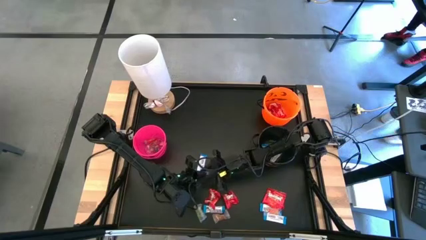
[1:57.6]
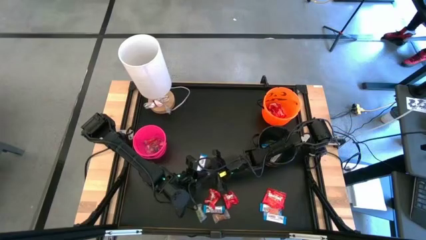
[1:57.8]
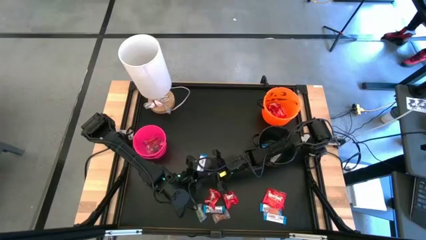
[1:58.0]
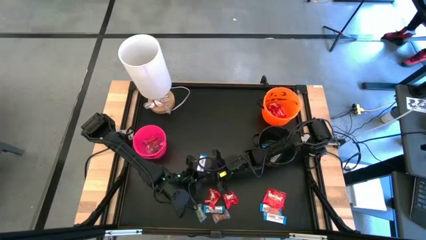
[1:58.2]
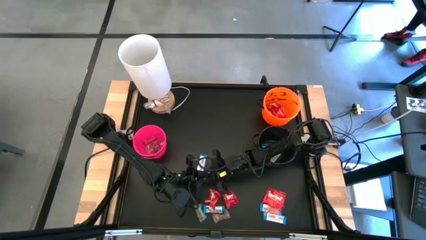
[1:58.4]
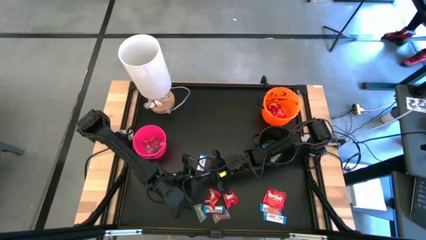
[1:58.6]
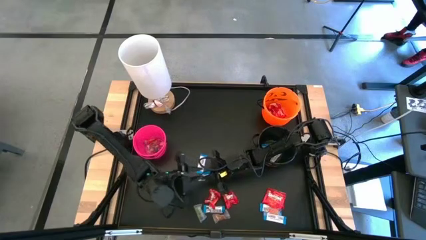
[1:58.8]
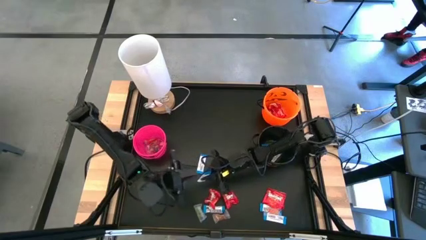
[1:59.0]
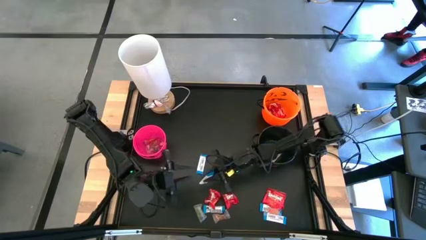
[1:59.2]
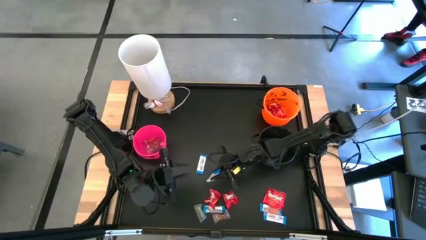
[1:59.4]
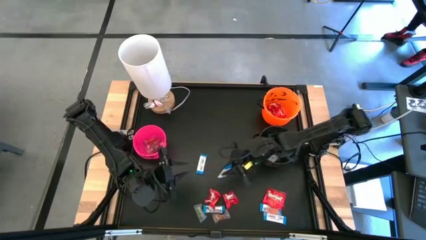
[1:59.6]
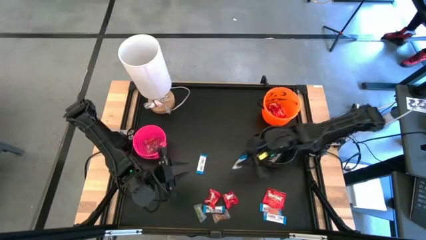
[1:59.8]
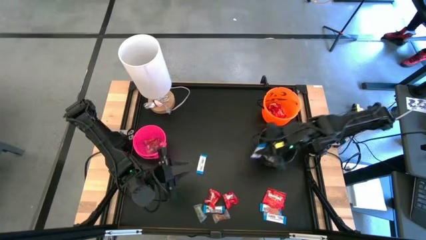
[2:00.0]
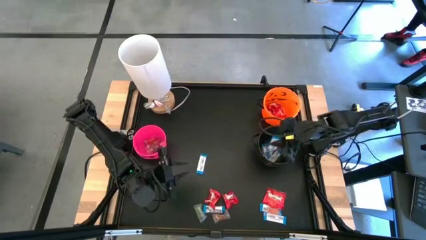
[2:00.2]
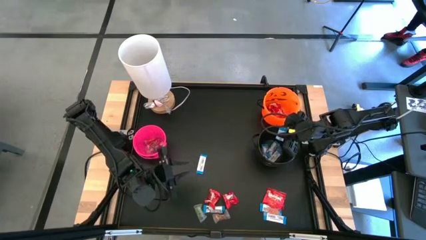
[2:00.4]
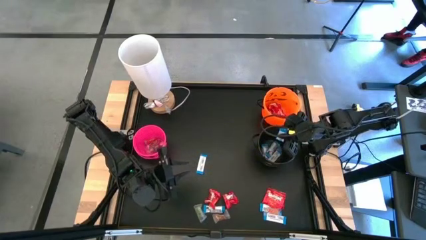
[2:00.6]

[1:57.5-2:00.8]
Task: Sort candy
Put the white chocolate into the black bucket

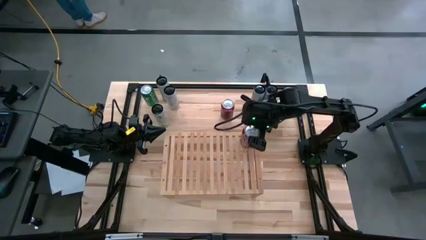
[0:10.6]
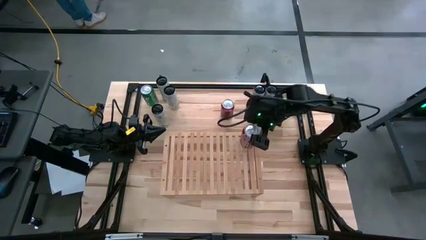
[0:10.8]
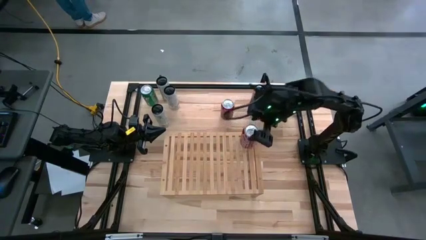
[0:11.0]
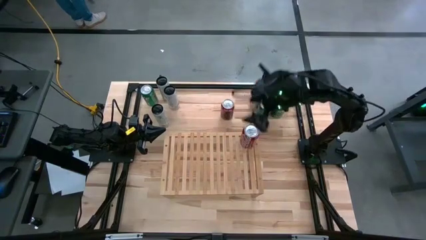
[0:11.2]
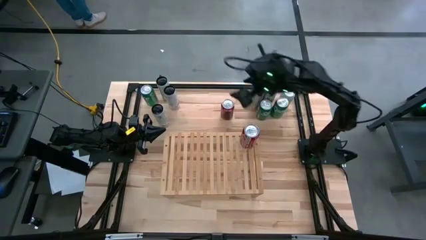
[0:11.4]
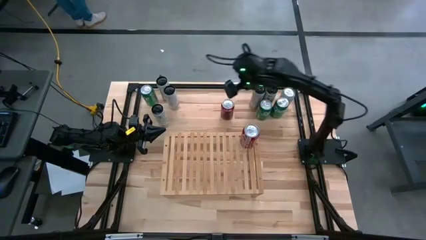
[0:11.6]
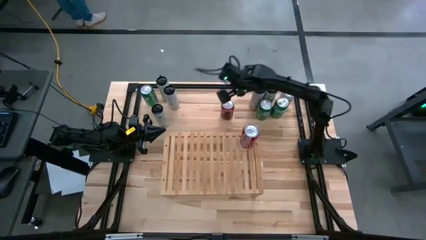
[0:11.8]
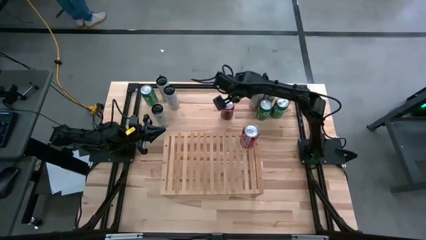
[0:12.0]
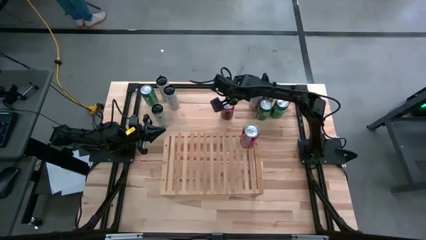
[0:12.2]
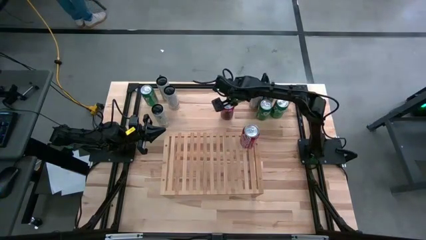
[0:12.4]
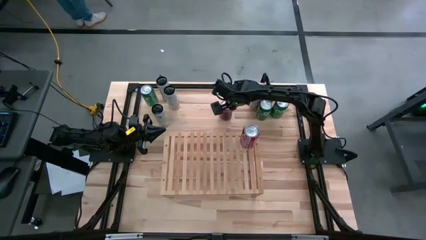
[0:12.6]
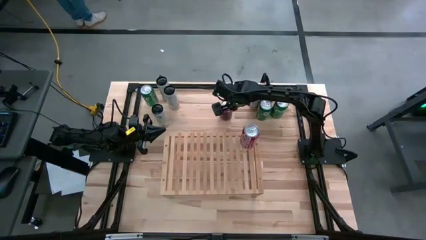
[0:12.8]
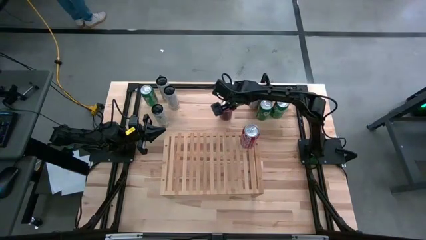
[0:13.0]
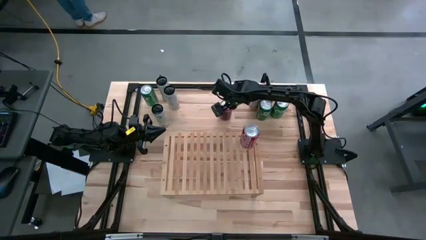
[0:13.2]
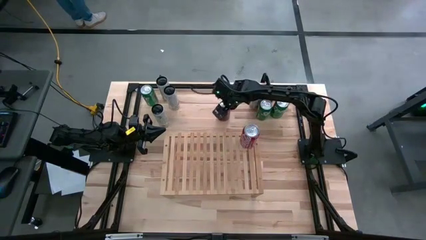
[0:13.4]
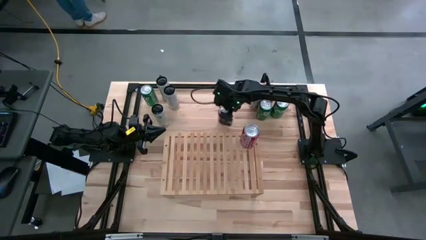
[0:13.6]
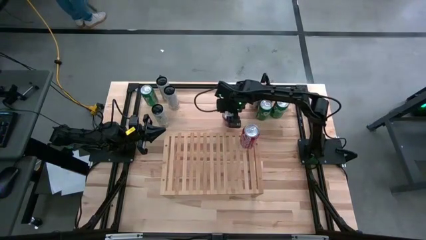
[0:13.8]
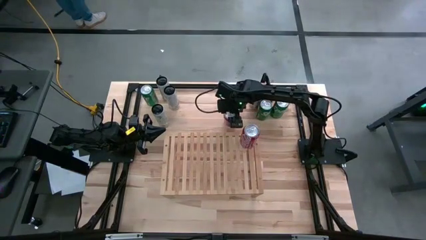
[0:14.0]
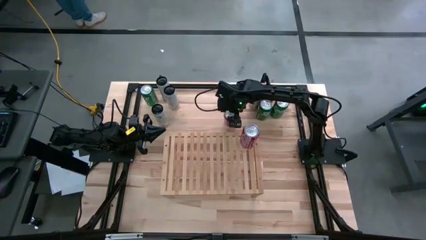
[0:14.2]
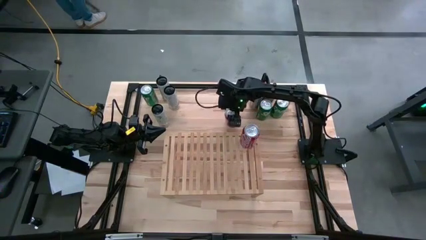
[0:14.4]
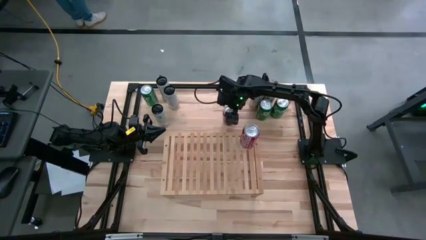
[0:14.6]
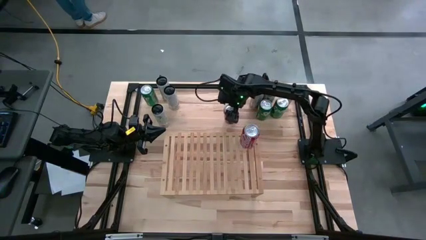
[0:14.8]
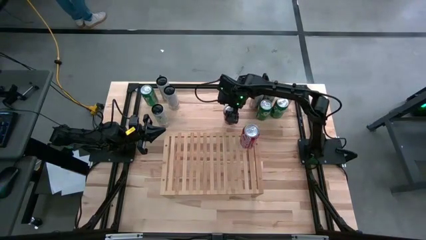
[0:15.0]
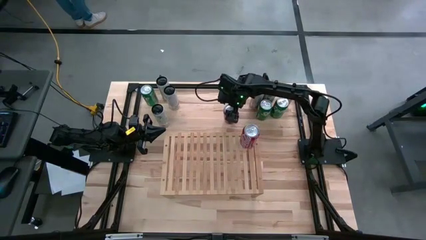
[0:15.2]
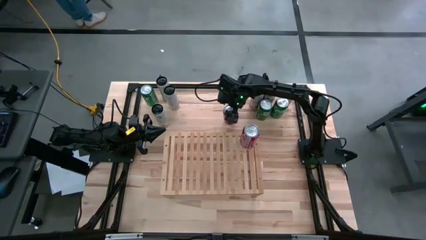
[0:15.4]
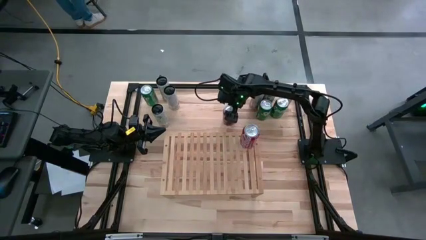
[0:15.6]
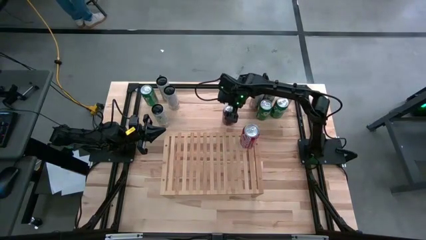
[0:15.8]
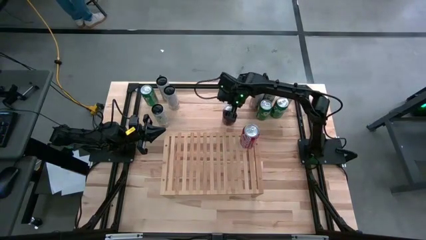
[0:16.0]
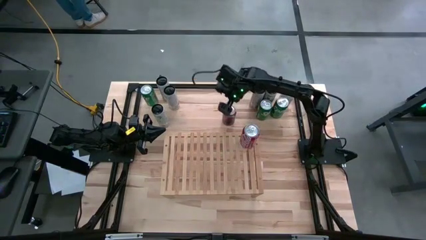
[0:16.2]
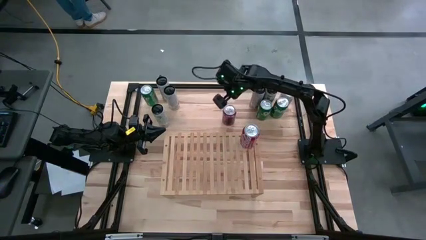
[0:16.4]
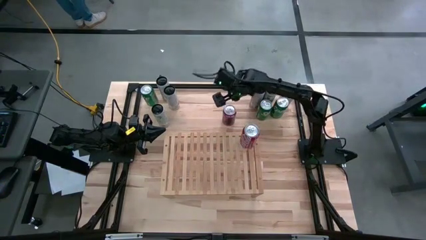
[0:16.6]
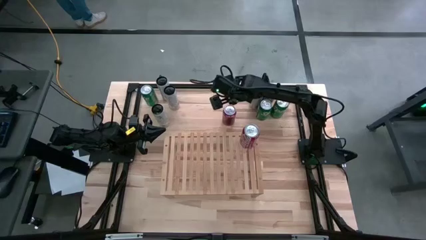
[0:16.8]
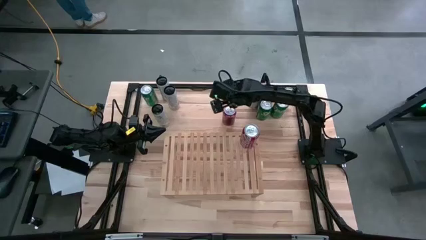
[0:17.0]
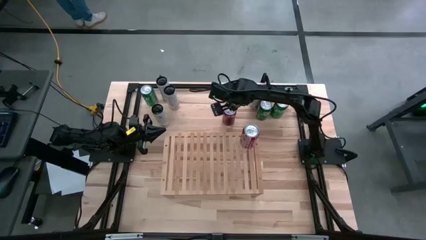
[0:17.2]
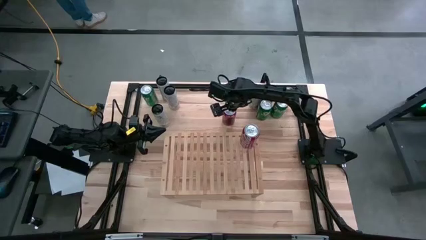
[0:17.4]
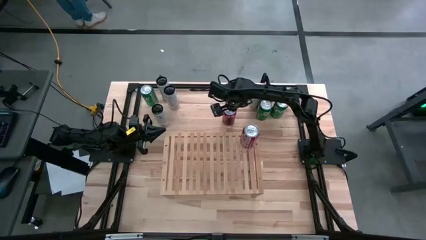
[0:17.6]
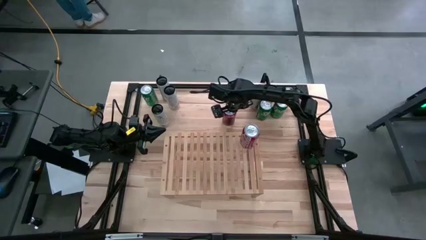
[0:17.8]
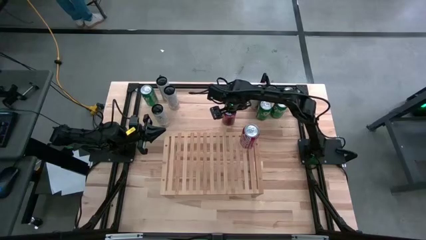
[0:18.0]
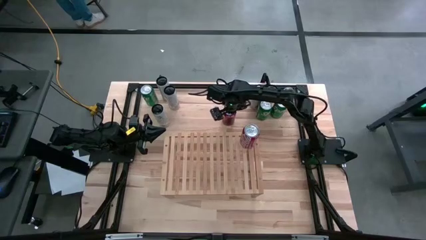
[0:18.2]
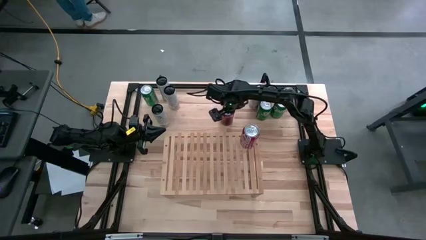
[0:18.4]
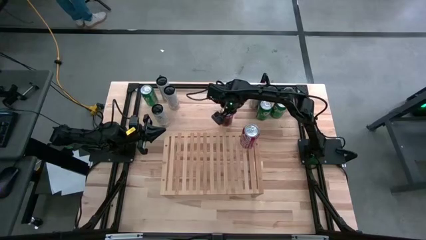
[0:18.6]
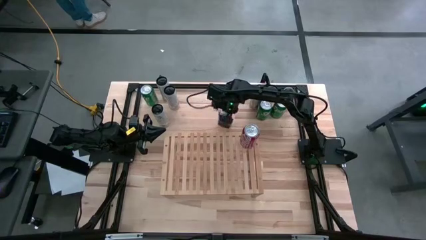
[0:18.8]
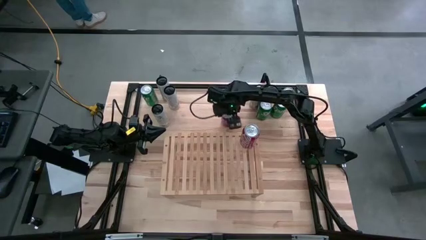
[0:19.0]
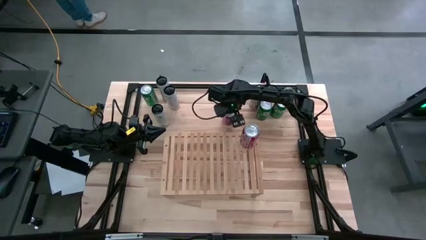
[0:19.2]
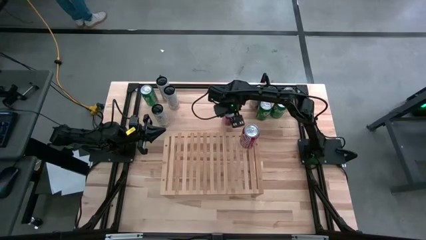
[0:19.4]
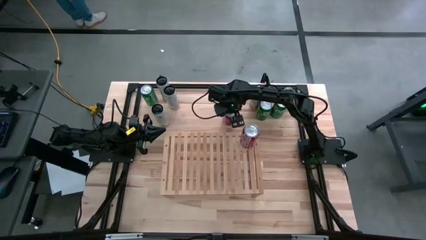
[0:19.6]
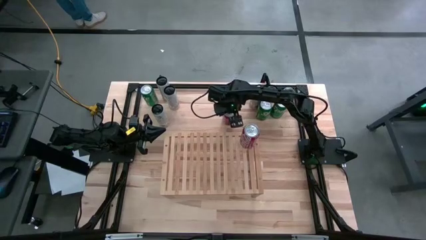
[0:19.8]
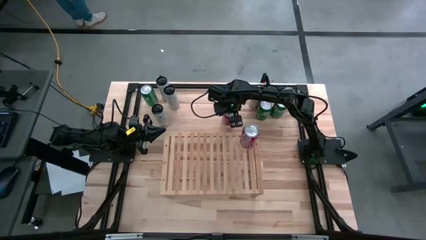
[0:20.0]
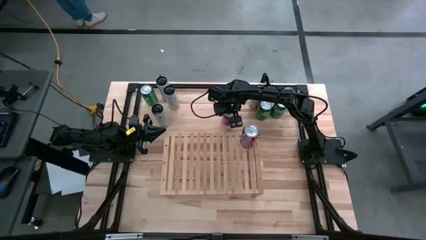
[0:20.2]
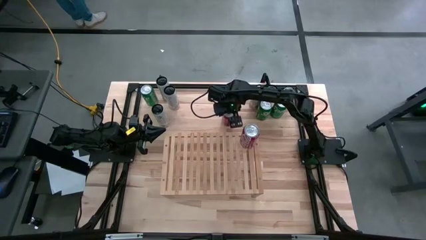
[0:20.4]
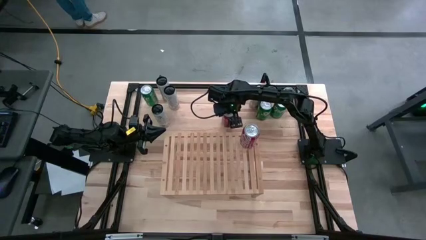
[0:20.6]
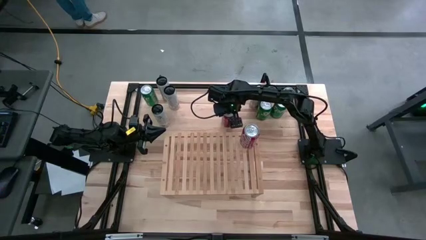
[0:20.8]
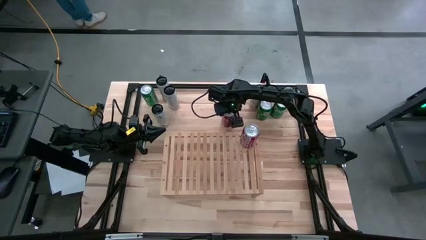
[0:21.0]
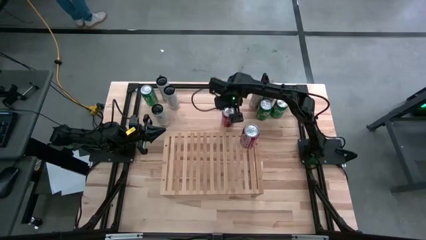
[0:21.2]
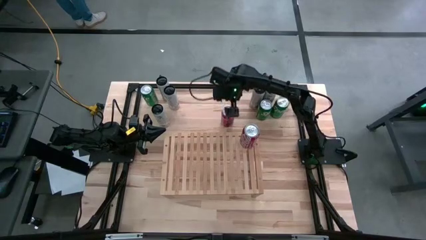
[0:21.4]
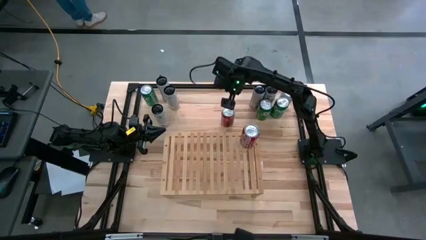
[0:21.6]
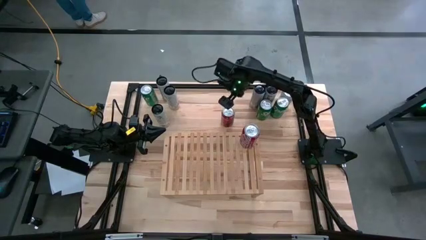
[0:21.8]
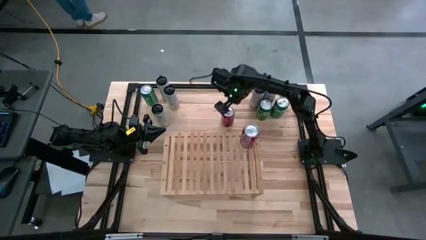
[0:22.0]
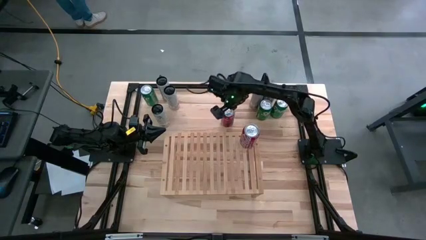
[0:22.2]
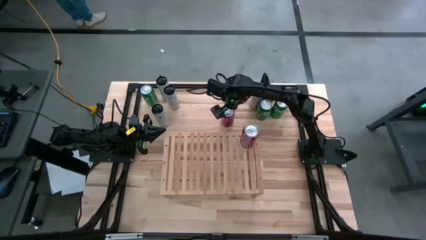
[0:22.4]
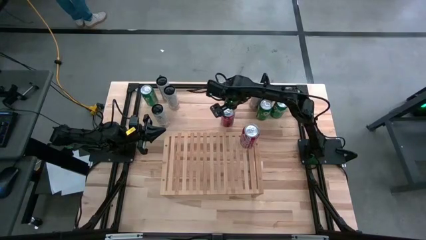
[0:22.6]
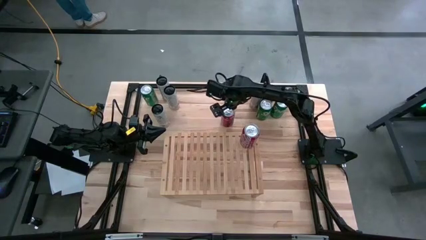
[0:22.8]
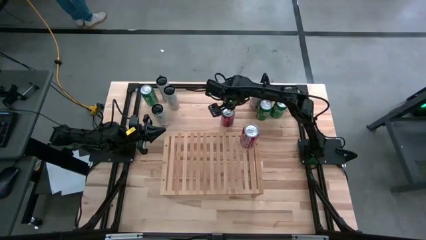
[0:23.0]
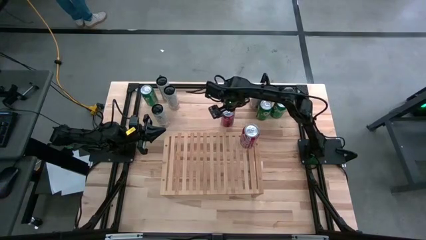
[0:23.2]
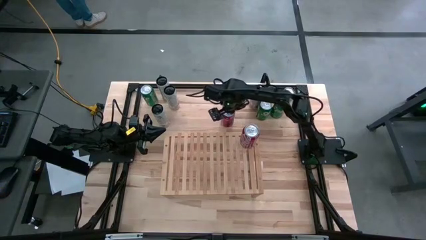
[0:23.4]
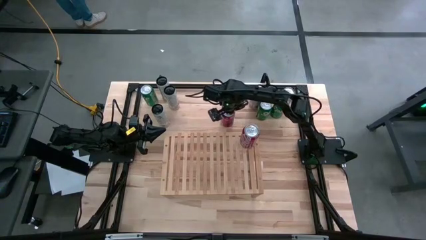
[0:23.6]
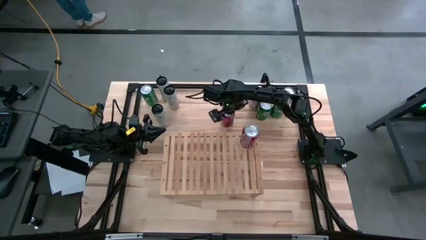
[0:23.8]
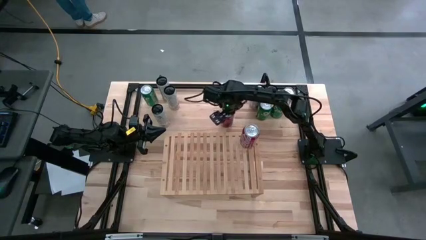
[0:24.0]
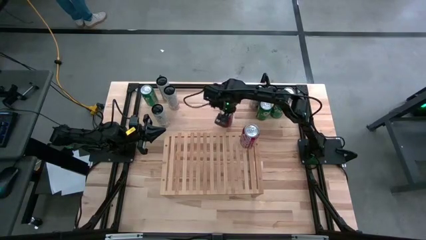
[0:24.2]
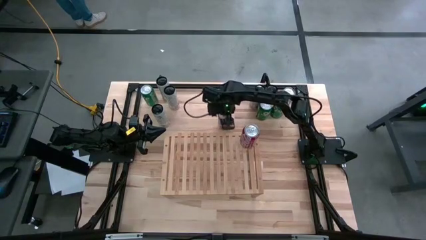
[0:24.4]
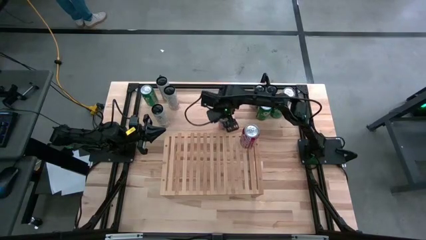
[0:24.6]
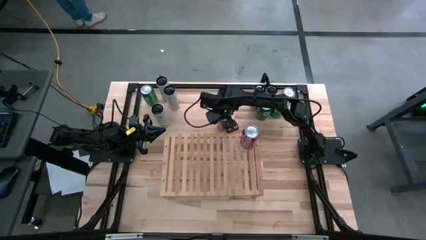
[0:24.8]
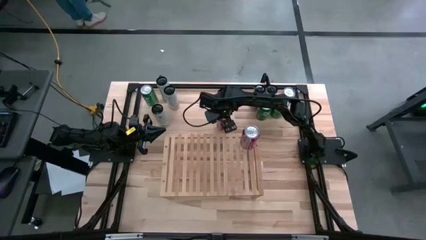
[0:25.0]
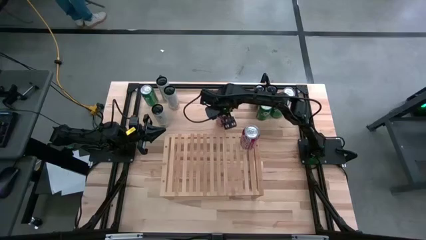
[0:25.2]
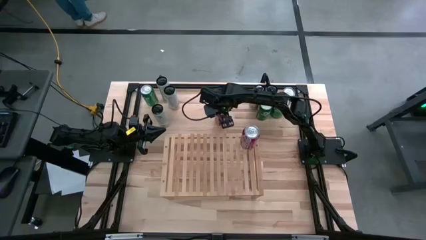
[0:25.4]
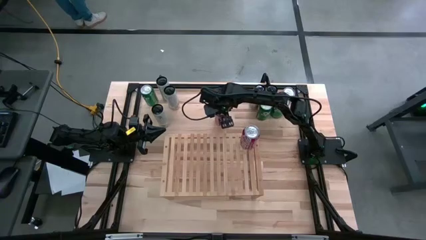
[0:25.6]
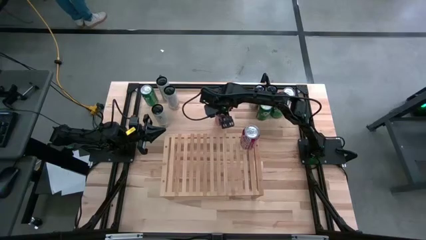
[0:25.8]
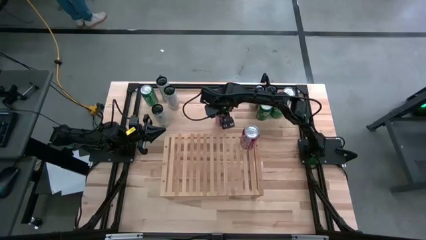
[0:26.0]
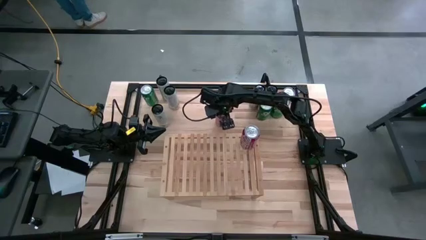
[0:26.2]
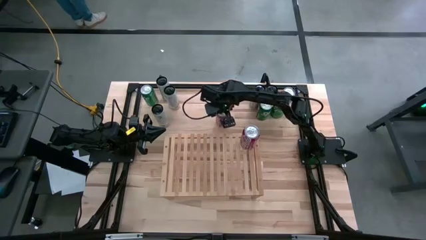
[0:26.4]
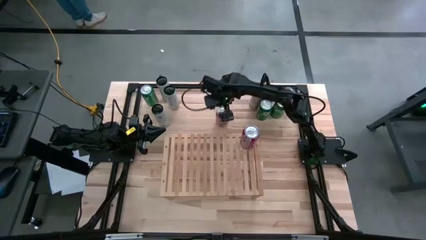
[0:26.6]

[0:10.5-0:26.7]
Task: Place canned beverage on shelf
Put the red-white soda can on the shelf aligned with the other red-white soda can
